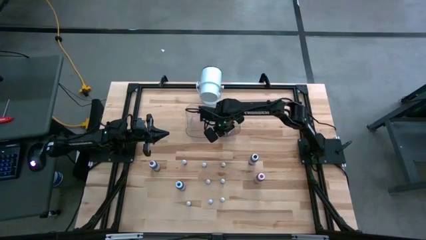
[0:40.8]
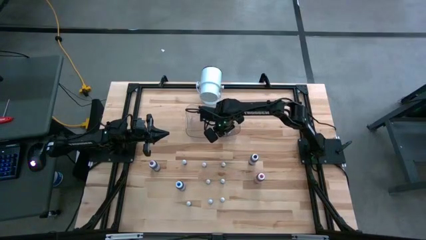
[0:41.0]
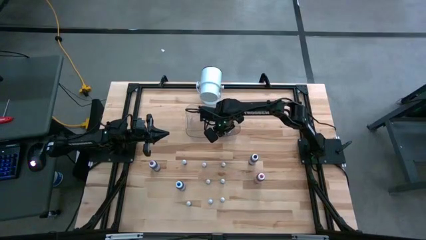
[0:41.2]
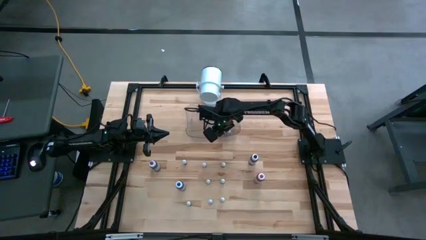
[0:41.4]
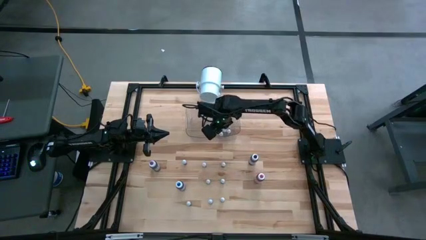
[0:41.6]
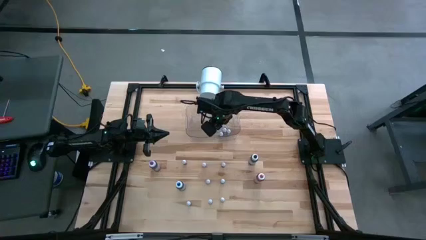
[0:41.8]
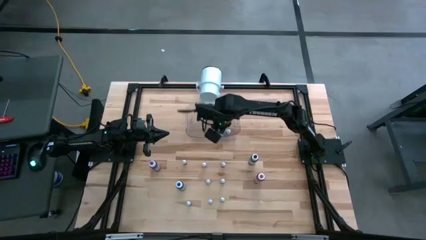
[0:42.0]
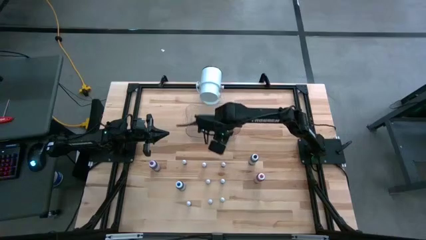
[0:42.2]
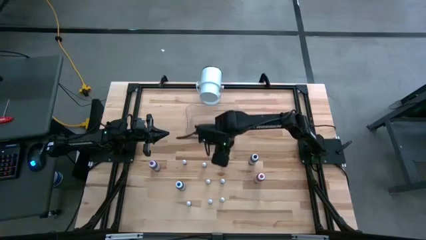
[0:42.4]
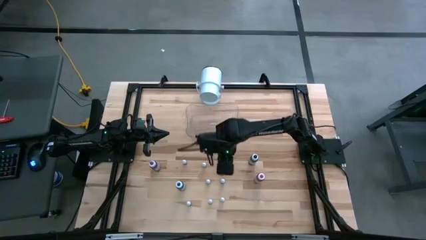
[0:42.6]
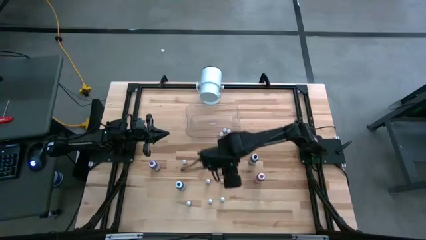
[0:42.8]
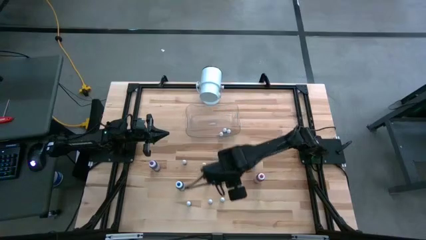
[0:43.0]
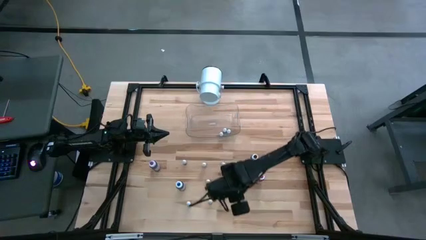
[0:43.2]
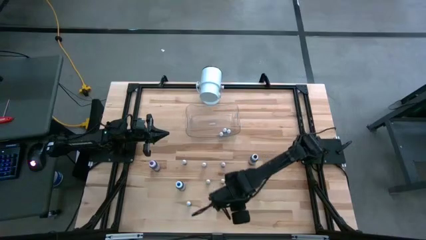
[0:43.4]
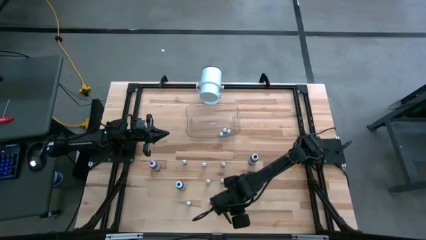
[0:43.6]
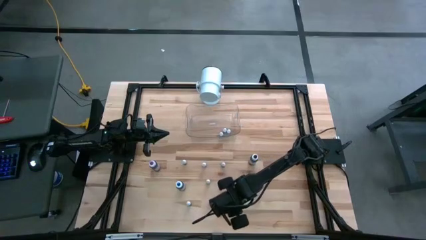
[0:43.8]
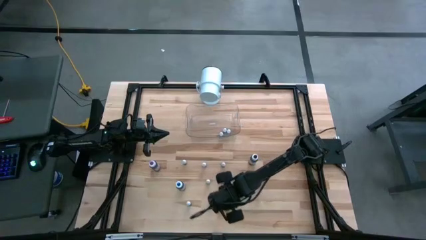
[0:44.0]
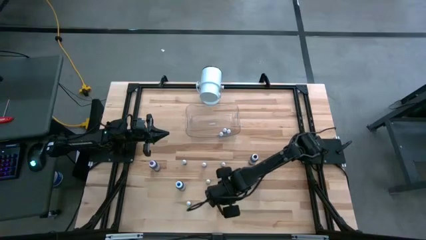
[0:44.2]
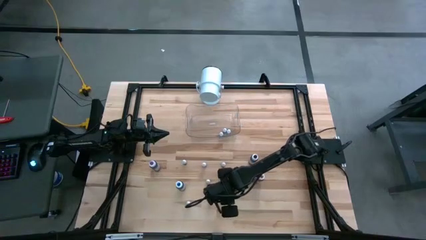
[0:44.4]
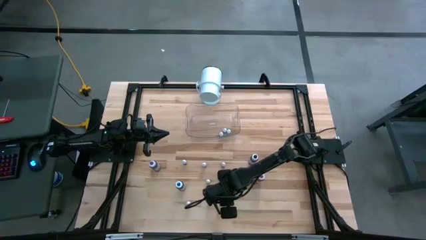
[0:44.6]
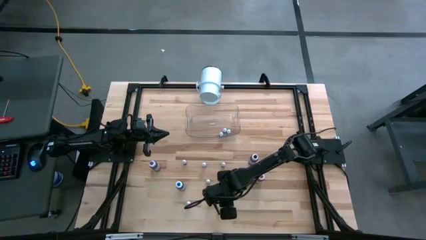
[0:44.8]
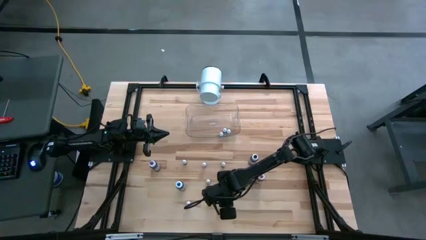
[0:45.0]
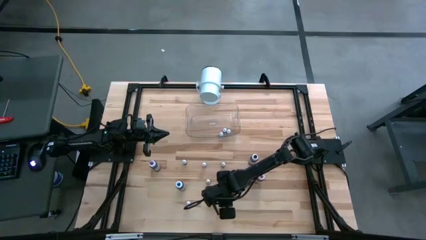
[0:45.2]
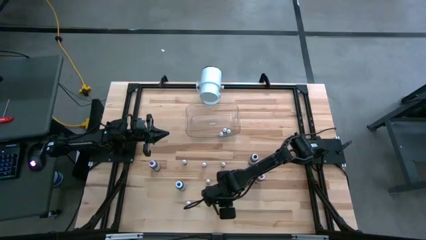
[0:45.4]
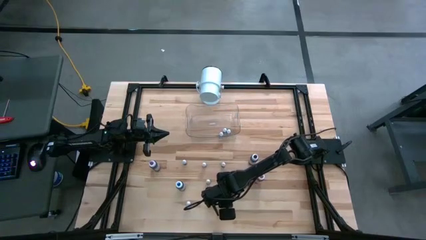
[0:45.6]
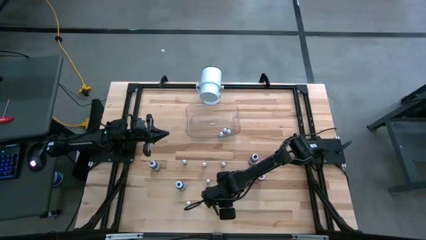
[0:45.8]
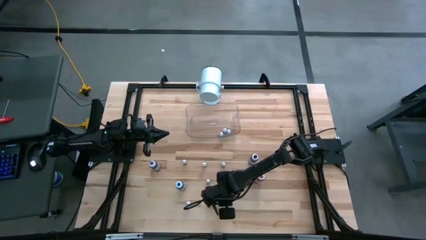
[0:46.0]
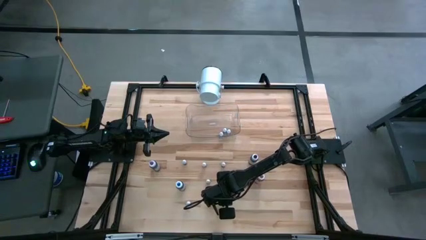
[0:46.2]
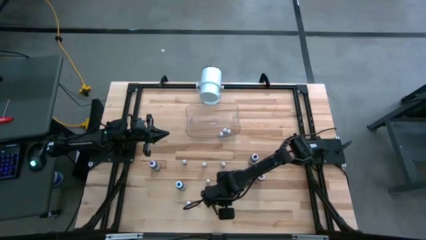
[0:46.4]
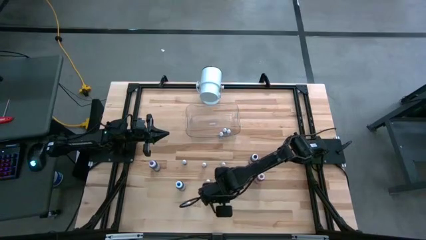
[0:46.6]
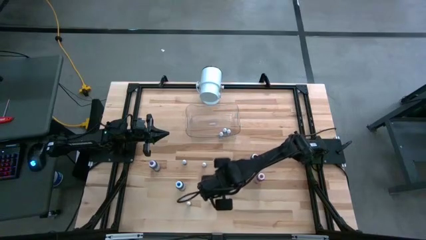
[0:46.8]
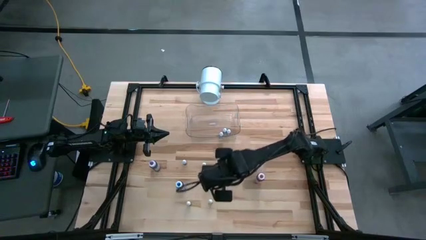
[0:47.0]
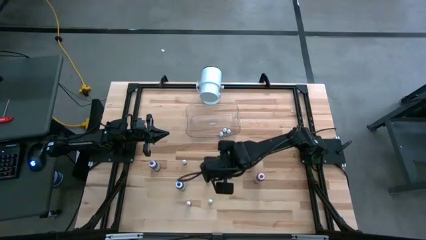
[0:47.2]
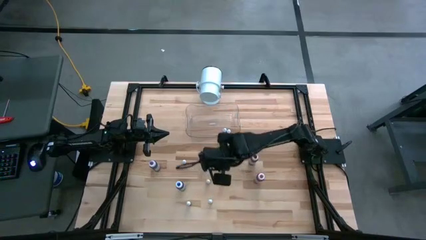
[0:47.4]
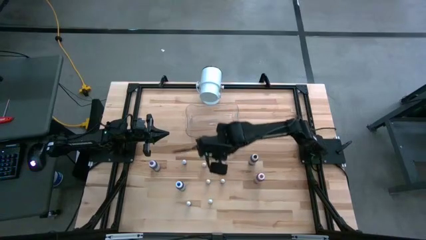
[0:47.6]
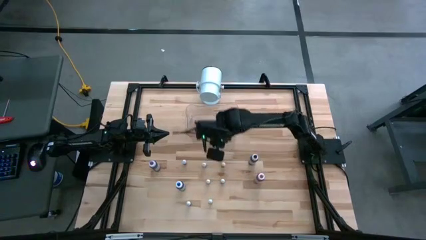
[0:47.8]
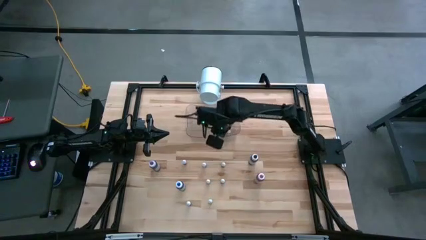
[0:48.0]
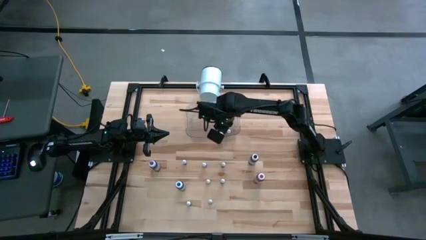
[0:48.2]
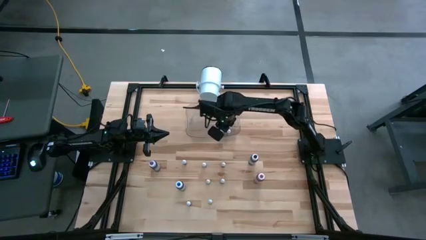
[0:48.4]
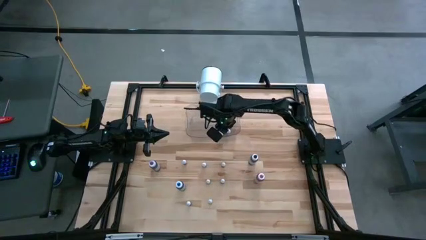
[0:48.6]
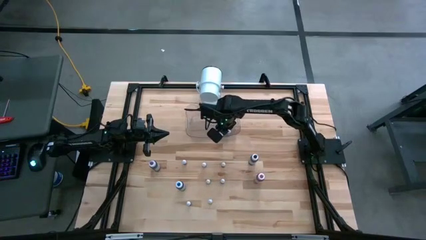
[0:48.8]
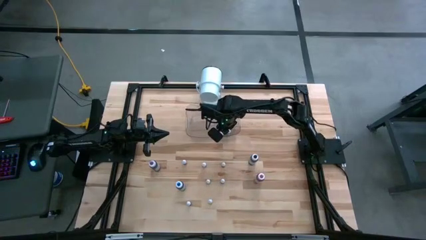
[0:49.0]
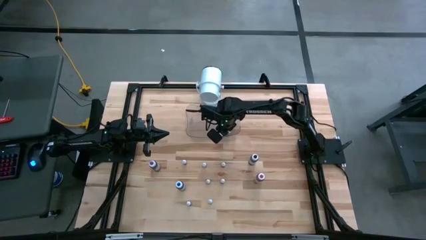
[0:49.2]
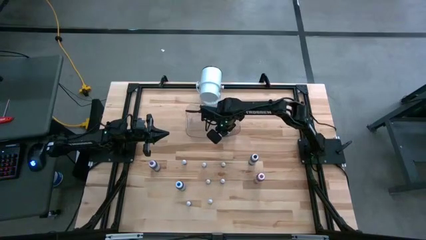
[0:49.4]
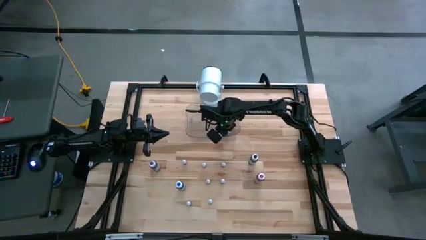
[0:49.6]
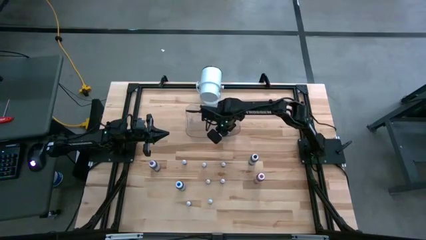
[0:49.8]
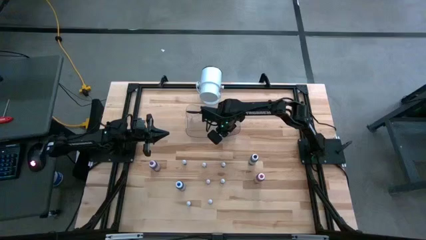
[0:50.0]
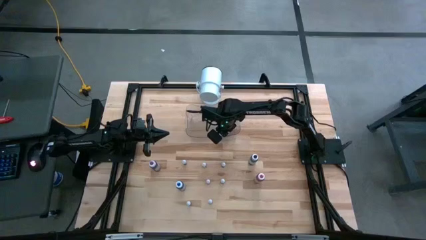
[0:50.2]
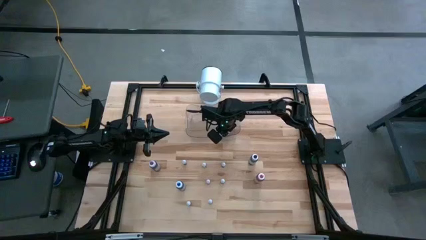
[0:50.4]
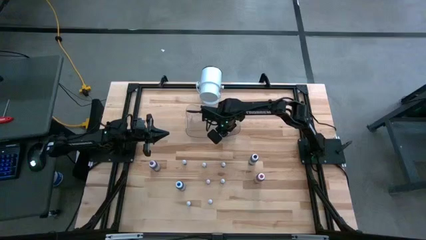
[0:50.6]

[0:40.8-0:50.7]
Task: Pick & Place food coloring
Put the small brown food coloring bottle into the transparent bin

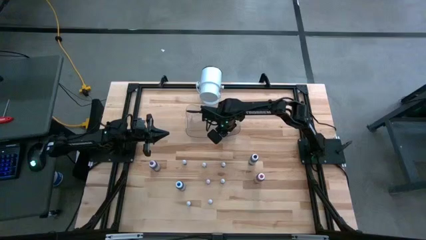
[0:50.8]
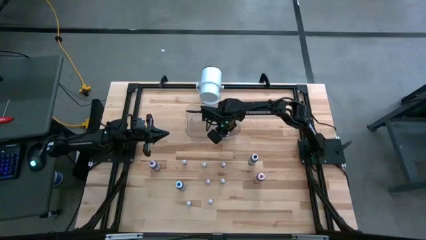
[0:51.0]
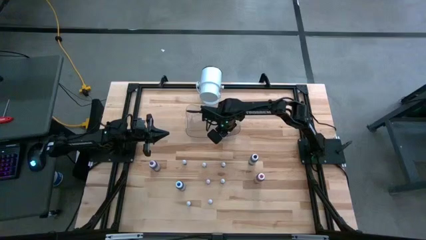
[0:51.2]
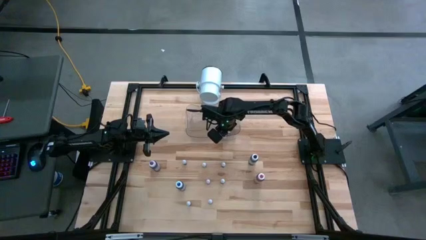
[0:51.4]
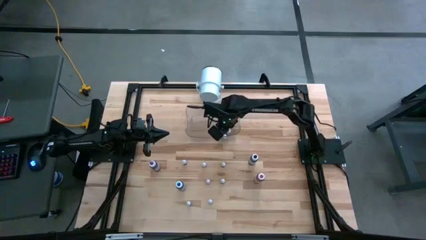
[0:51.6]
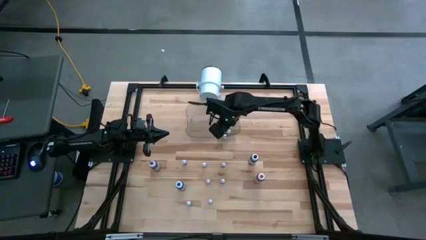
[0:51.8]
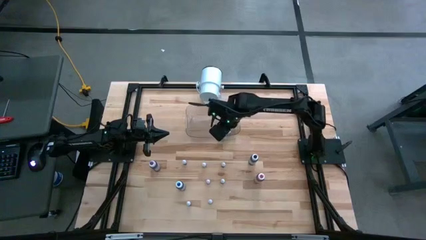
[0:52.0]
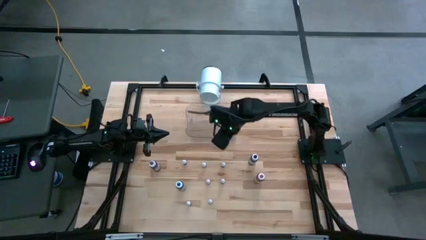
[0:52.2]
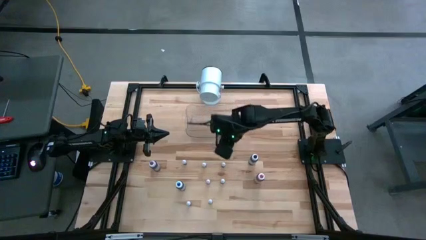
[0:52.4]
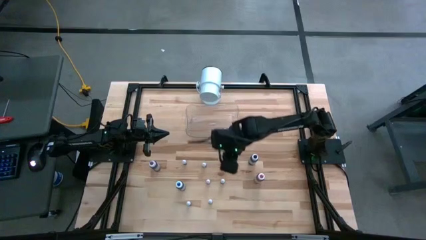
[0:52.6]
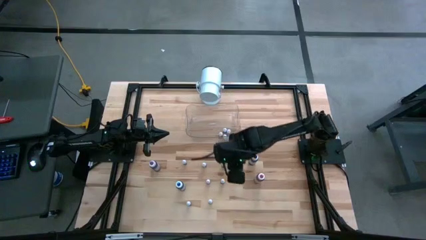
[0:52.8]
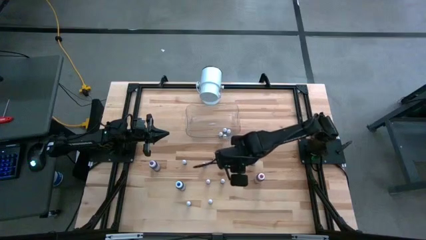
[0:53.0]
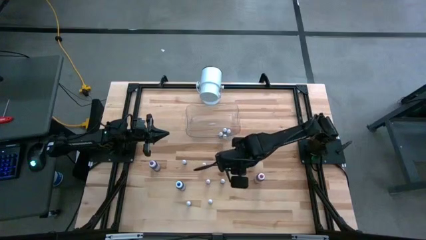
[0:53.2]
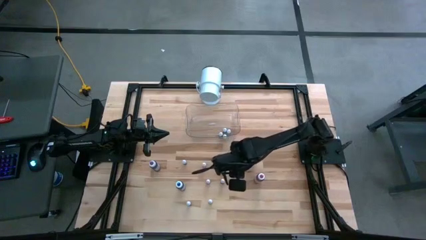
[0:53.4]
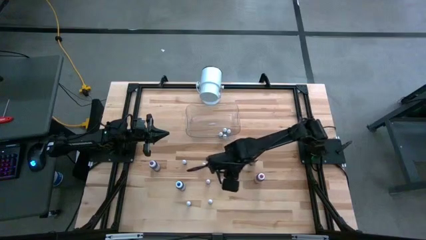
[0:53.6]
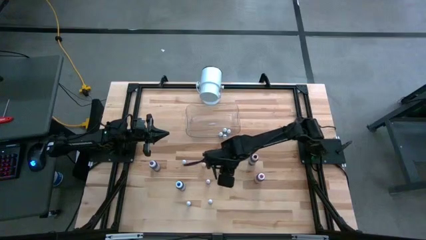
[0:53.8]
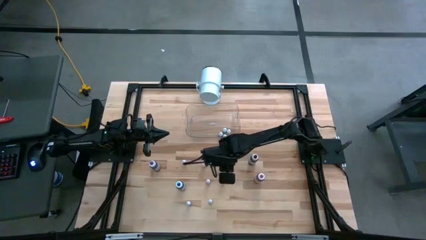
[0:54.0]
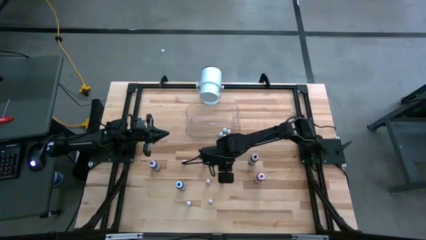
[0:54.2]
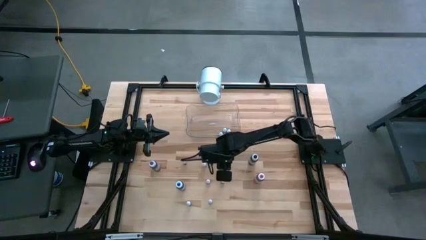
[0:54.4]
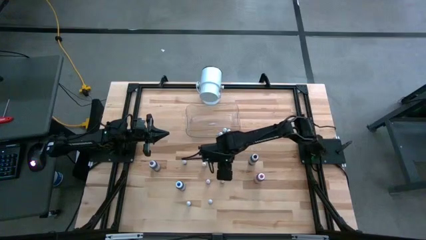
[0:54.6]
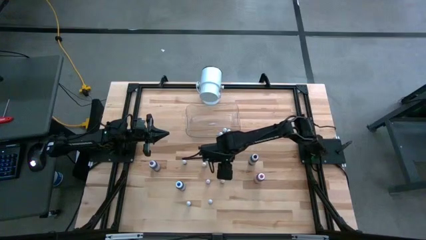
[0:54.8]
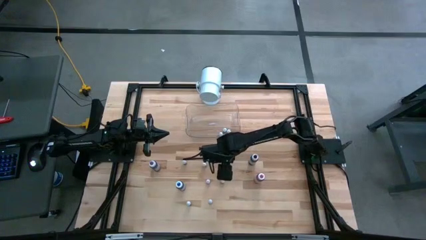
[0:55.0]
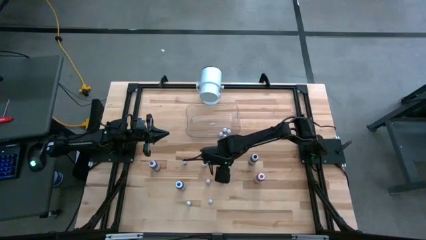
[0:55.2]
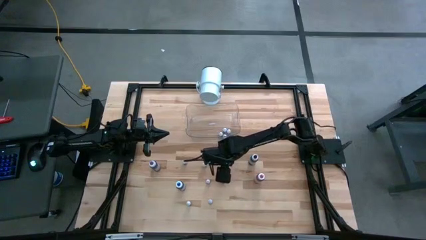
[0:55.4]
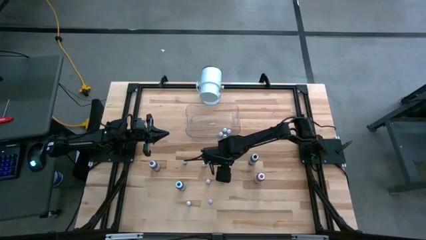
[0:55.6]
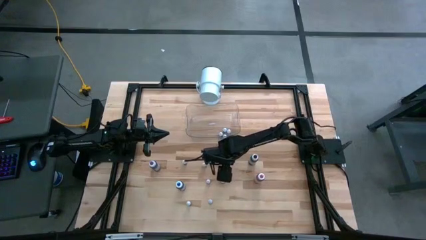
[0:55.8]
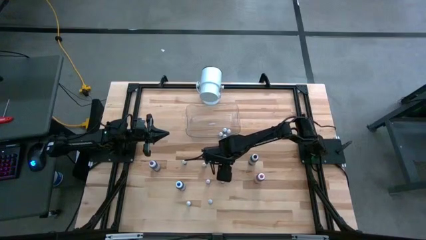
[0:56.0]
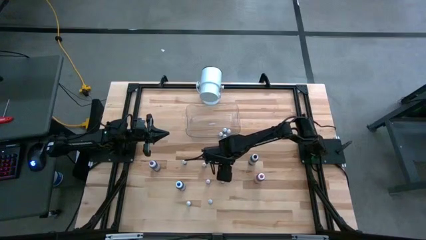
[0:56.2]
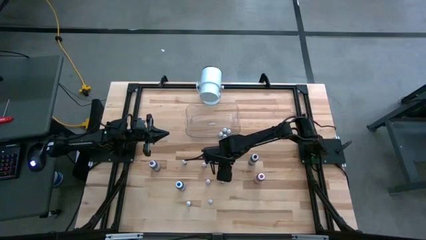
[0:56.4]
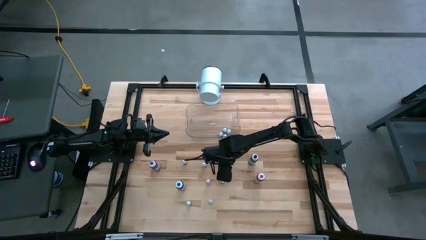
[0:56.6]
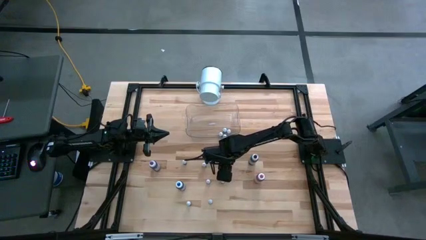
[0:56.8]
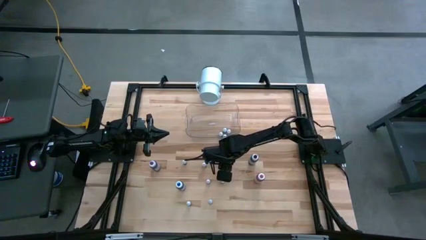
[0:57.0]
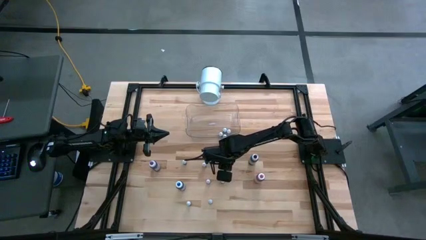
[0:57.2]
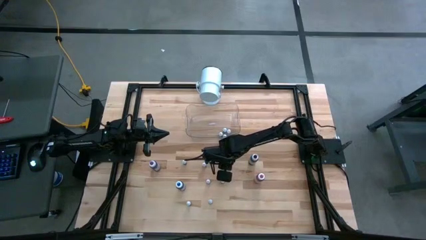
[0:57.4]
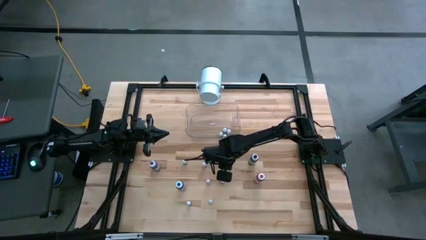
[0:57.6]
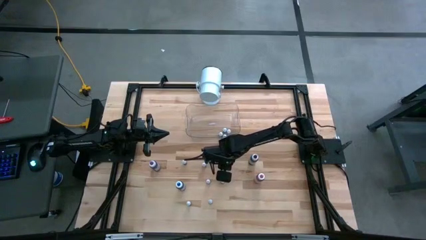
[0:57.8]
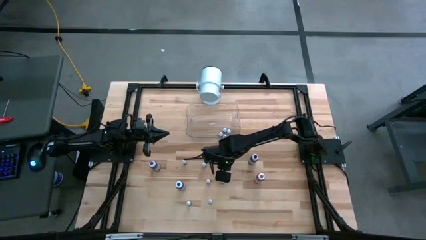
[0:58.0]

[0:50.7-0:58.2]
Put the small black food coloring bottle into the transparent bin
